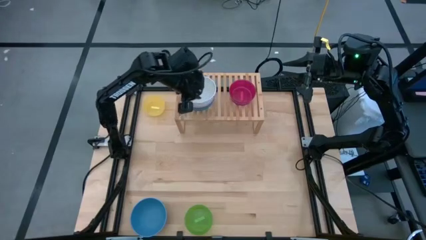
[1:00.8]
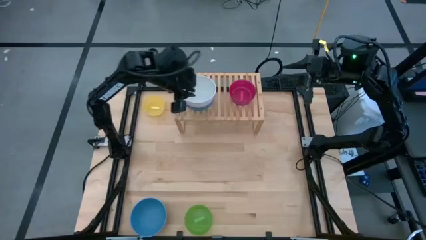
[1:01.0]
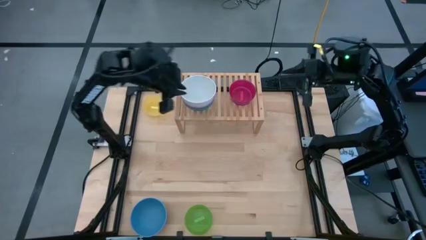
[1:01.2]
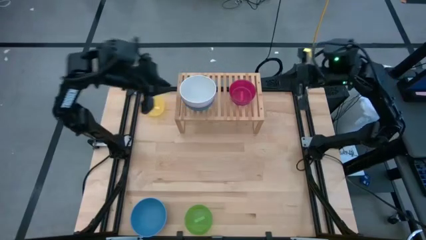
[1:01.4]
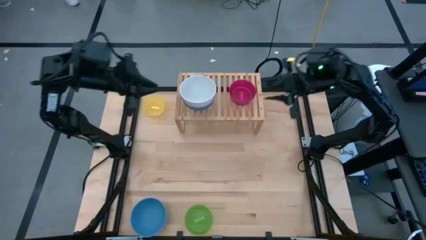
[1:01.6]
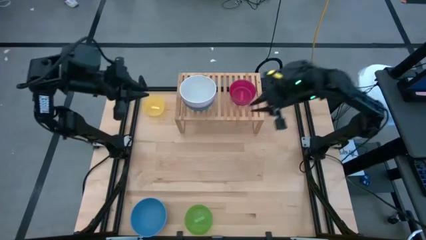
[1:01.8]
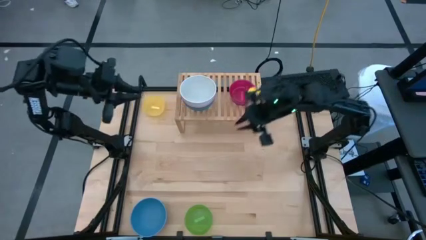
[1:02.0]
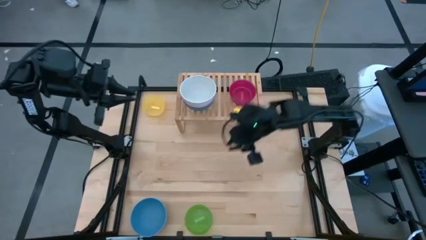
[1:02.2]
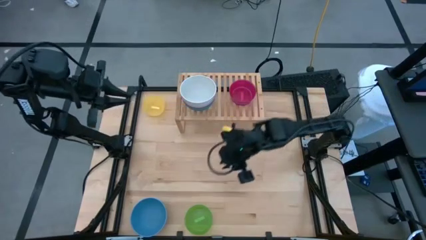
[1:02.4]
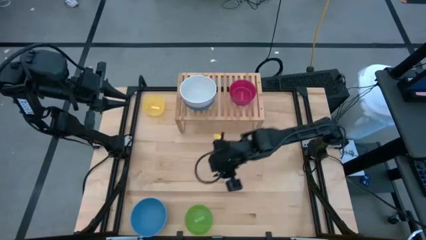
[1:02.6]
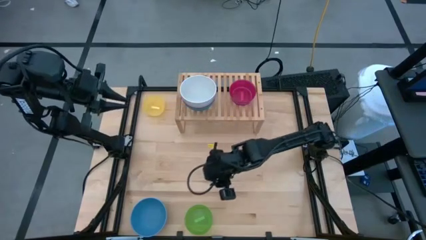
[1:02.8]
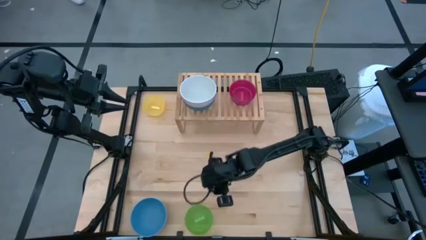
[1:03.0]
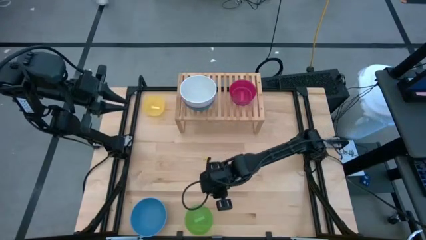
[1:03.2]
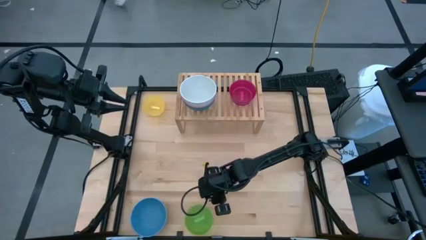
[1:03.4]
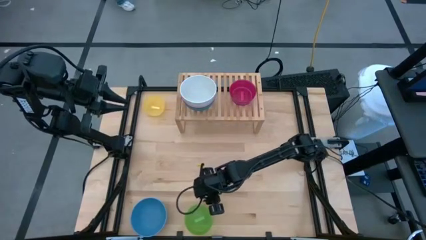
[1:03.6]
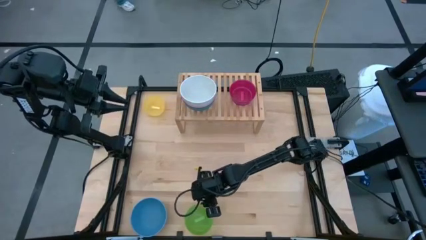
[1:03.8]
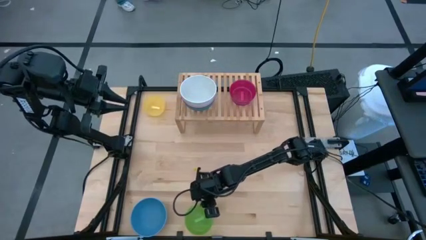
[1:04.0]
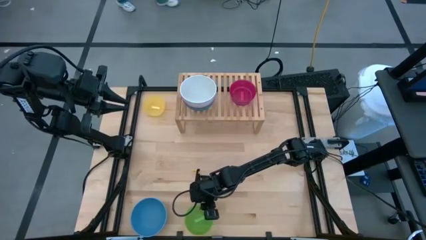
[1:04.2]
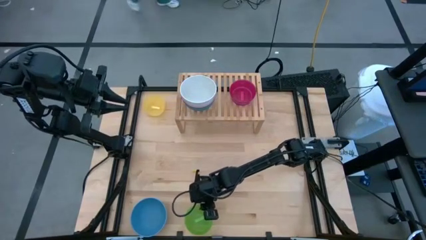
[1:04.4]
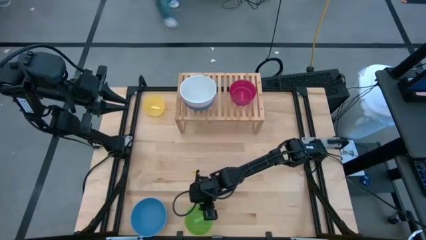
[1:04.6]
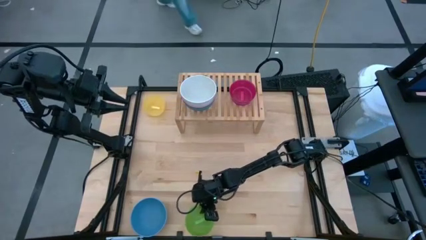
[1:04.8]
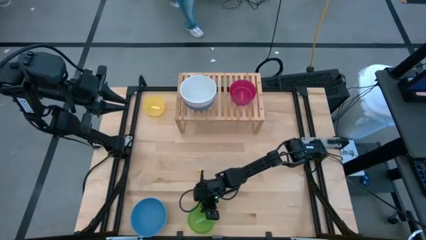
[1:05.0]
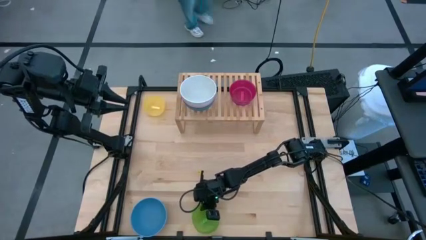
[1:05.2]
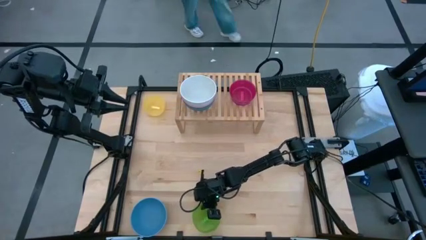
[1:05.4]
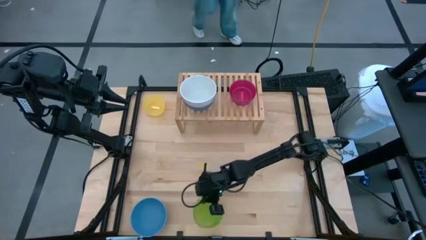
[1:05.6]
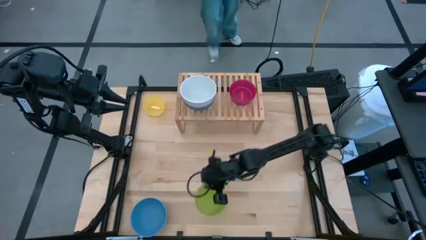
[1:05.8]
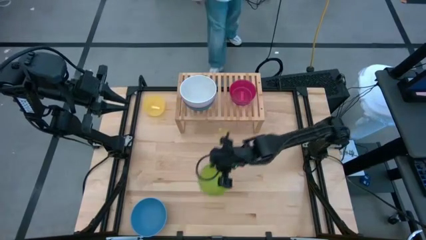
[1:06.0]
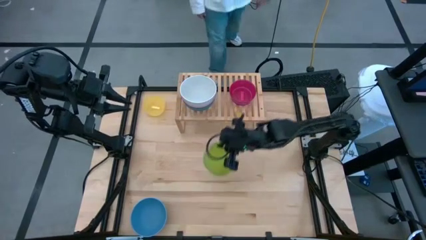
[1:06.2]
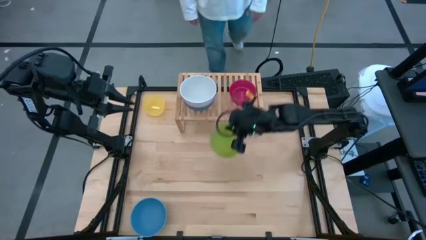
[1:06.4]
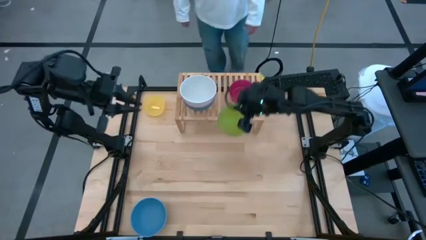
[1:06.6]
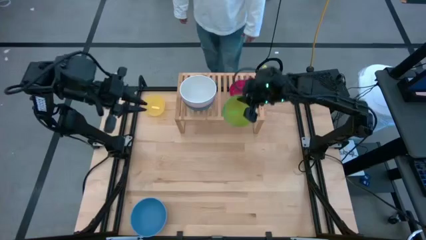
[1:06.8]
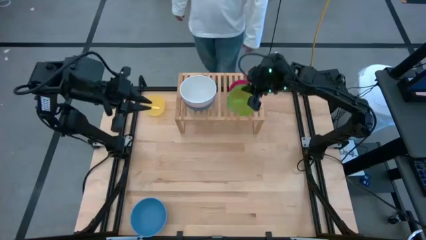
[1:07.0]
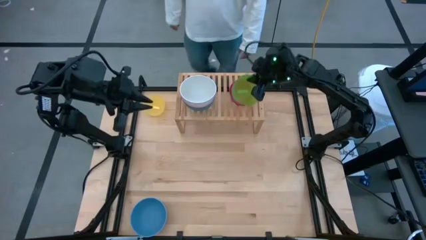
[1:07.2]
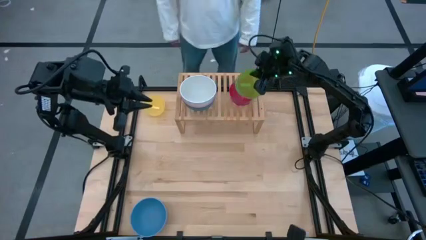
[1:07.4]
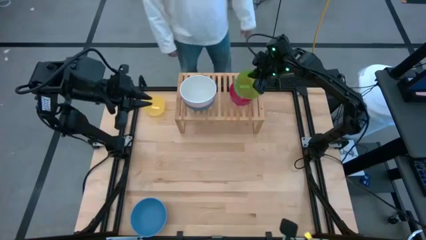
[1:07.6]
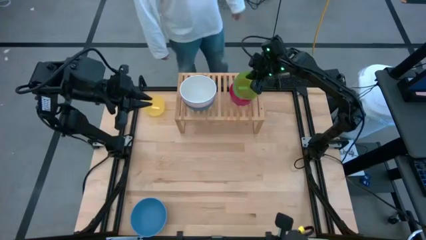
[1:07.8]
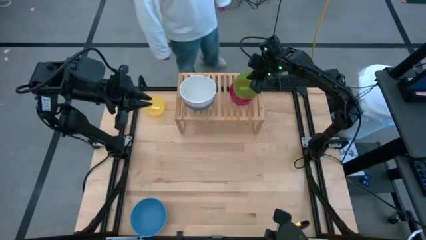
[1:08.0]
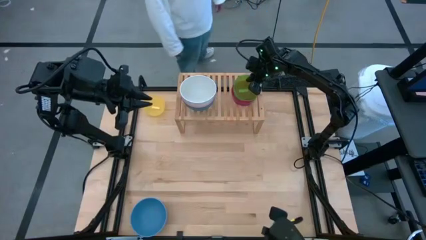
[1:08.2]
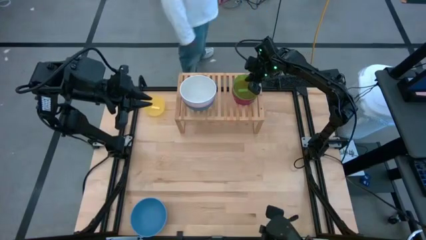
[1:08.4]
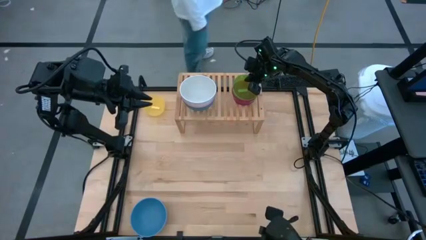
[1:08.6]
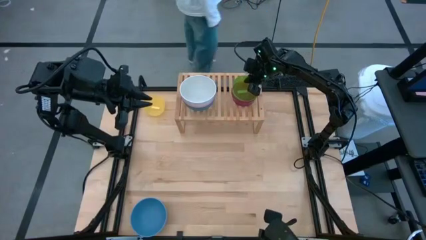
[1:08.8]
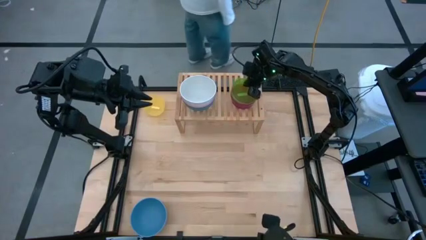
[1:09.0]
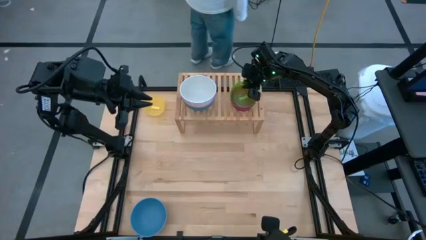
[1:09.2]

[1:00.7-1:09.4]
Task: Place and stack bowls onto a shelf
Stack the light green bowl on top of the red bowl on the shelf

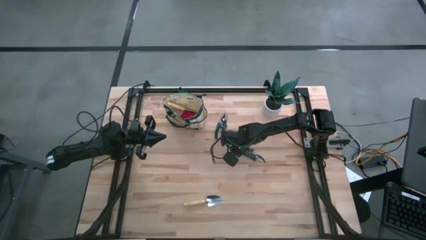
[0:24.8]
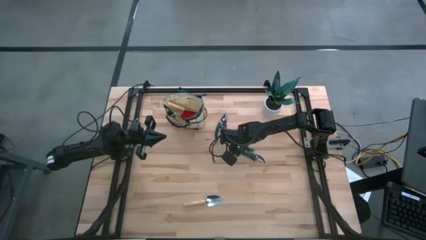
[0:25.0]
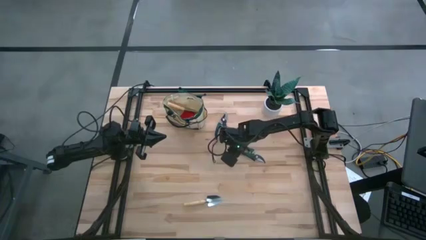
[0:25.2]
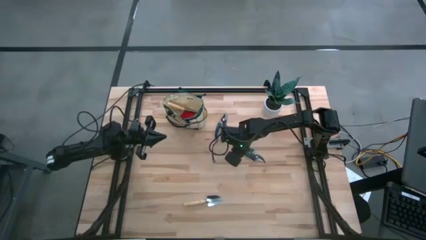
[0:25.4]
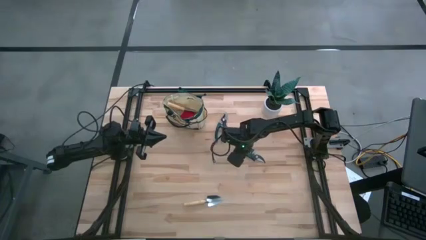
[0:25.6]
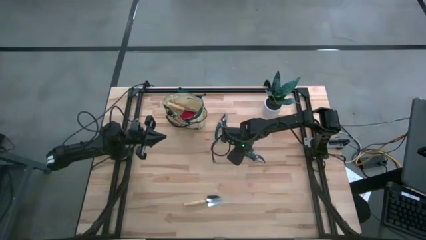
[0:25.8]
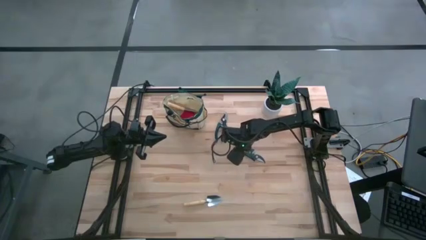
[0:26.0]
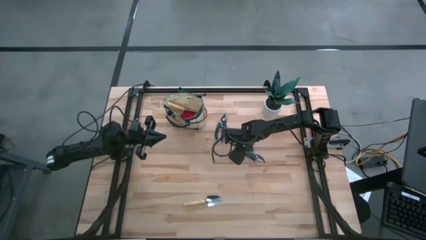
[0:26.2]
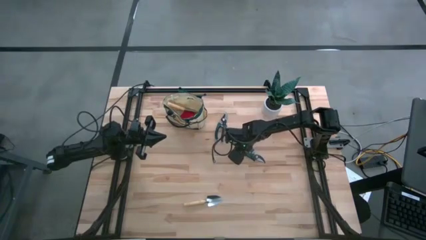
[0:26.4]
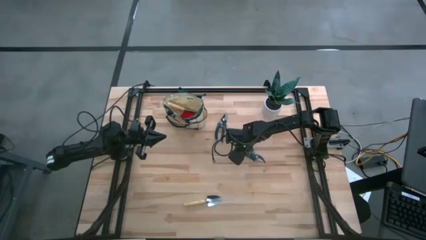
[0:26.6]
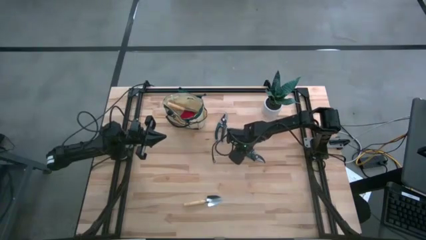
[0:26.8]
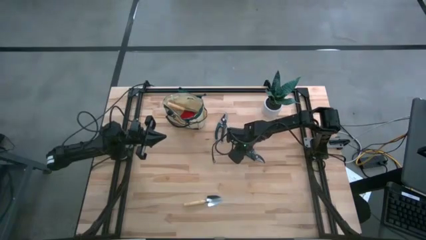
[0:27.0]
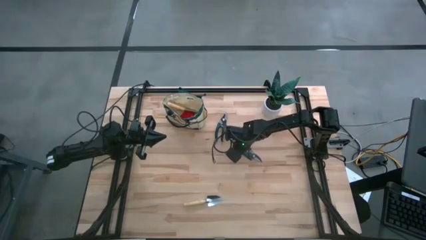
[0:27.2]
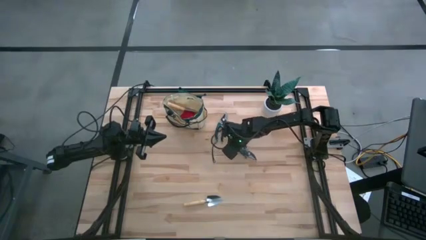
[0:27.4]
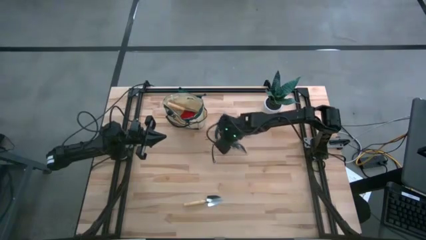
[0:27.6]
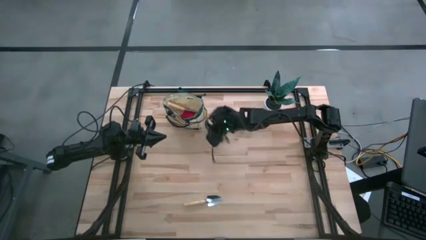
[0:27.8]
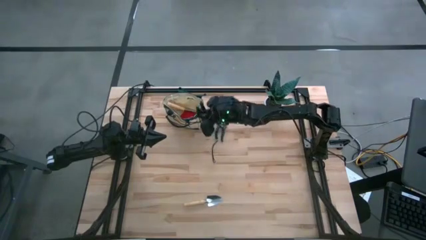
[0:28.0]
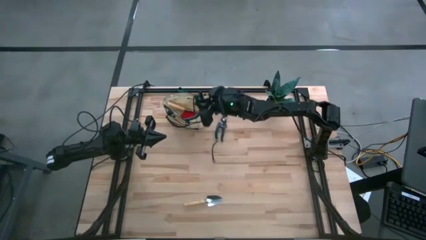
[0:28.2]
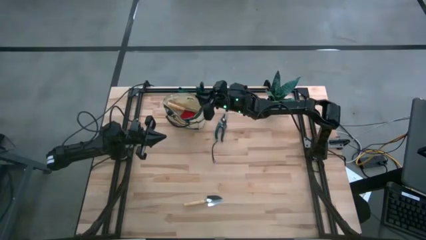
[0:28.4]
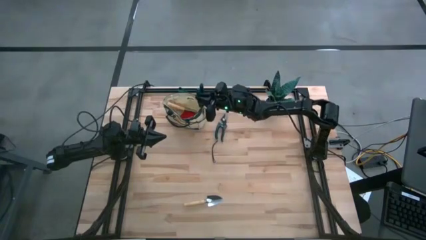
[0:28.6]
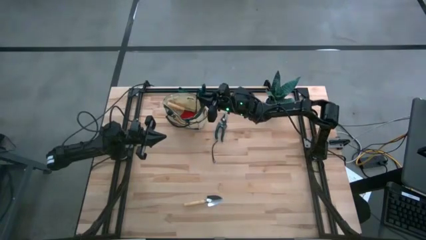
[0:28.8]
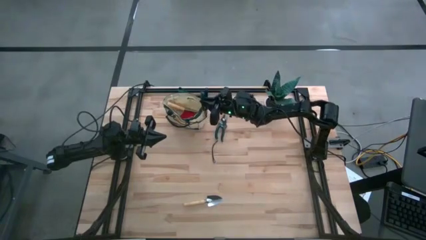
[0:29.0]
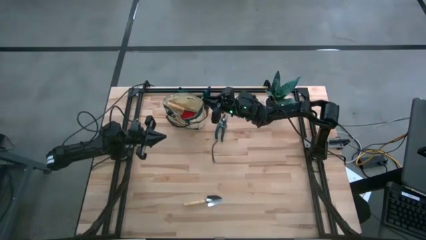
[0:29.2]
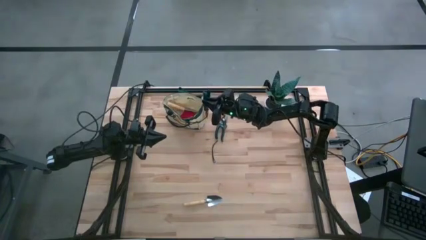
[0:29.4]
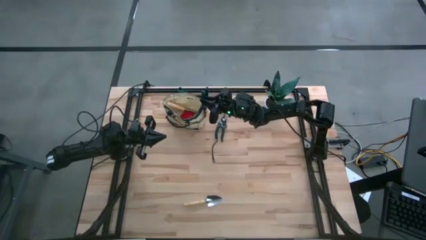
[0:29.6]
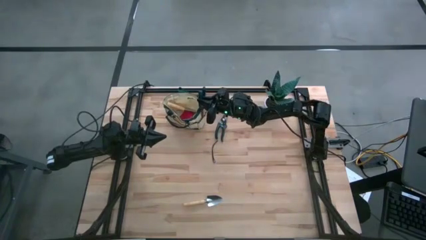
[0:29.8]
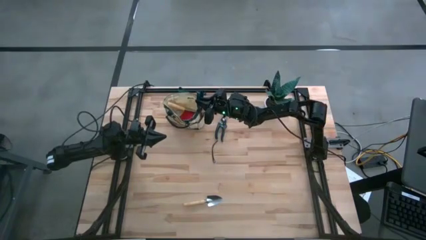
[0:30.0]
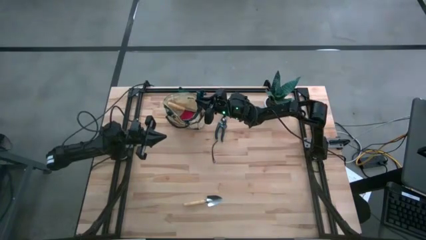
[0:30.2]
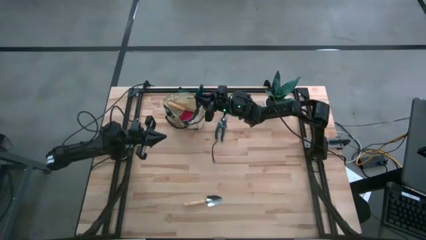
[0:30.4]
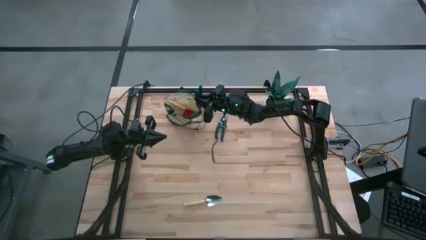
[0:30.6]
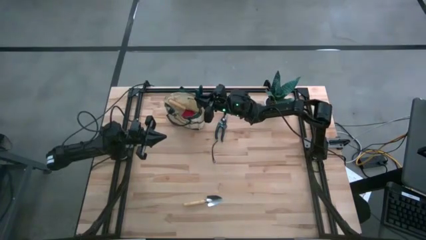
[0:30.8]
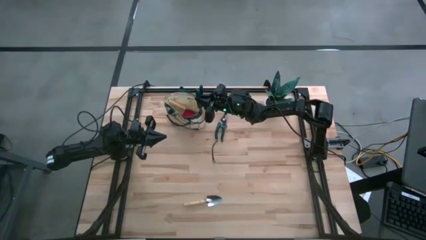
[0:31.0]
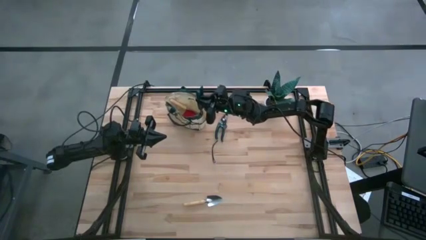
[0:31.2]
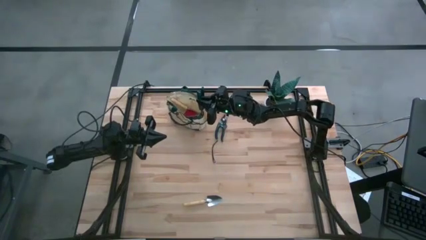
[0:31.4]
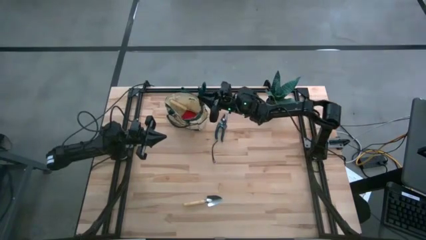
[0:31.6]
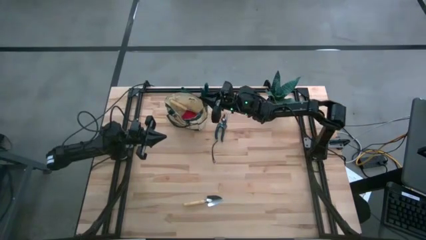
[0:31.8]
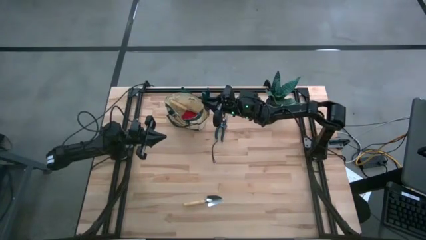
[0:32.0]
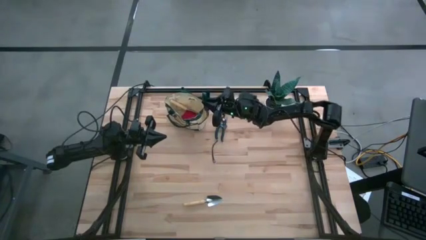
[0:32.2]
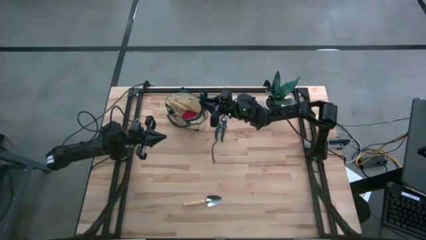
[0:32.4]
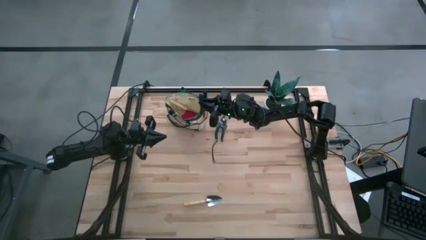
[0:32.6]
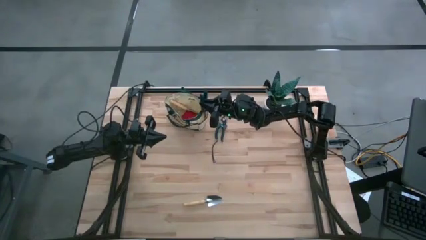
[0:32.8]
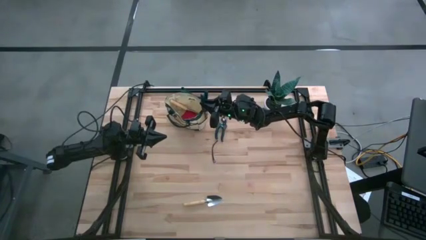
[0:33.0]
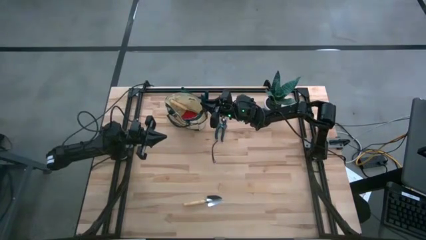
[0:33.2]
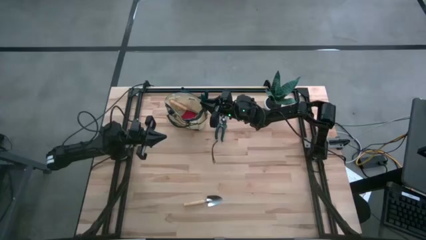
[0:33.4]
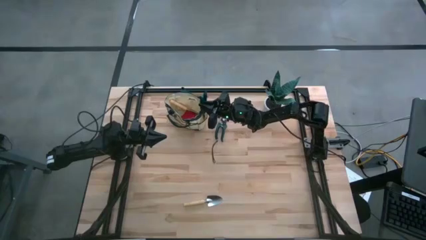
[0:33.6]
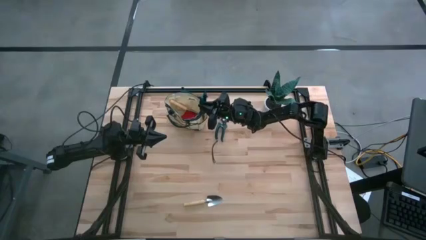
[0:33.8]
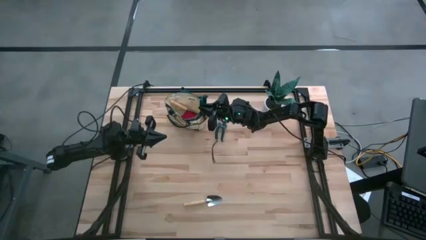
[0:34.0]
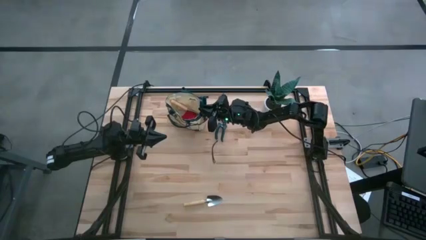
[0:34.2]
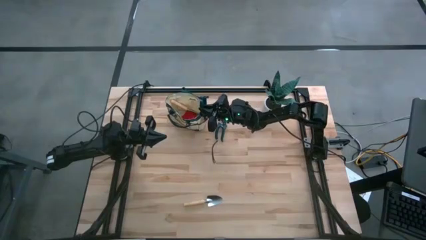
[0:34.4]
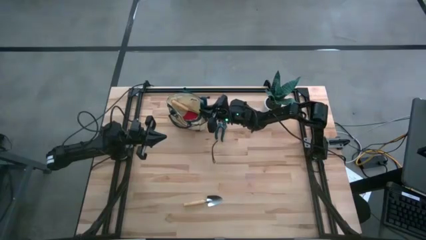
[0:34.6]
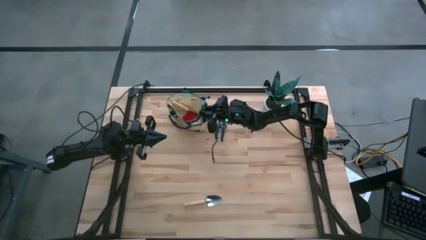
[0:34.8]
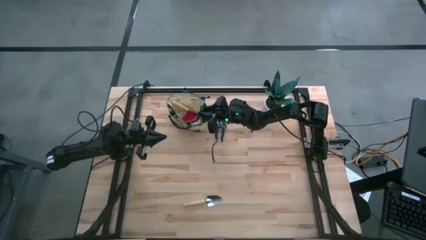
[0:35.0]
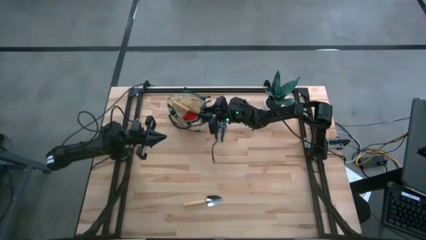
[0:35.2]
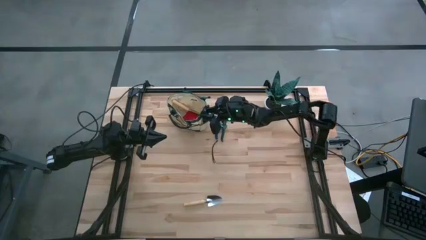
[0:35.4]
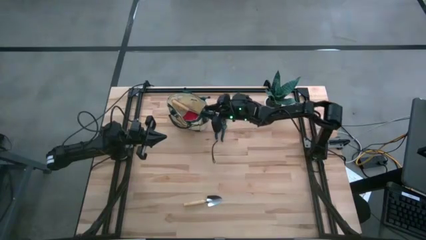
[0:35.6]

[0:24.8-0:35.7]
Task: Pick & Place Garden tools in Gardening bag
Put the bottom shear scissor into the gardening bag
